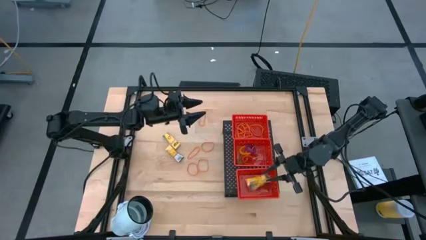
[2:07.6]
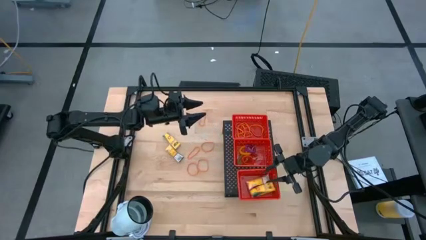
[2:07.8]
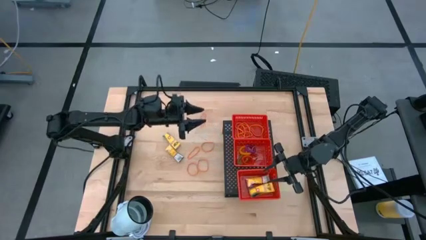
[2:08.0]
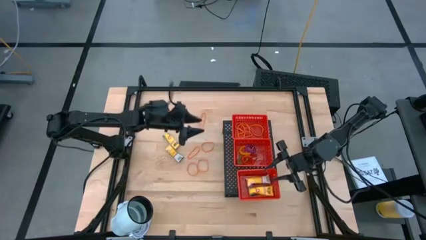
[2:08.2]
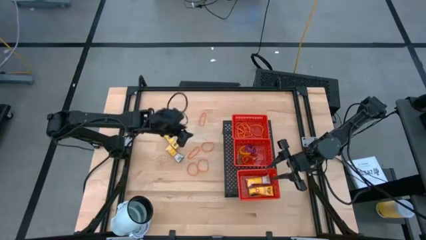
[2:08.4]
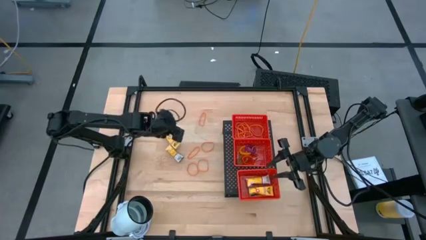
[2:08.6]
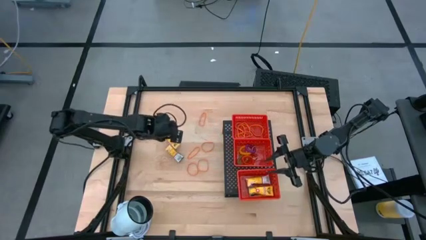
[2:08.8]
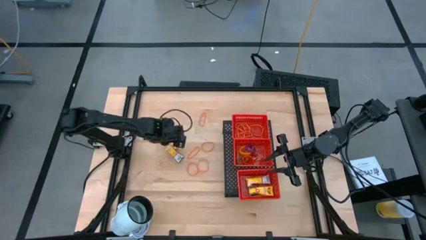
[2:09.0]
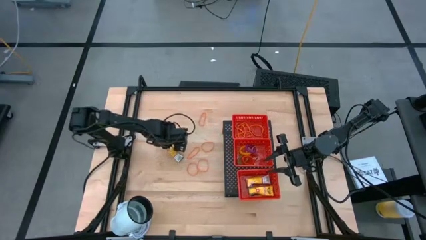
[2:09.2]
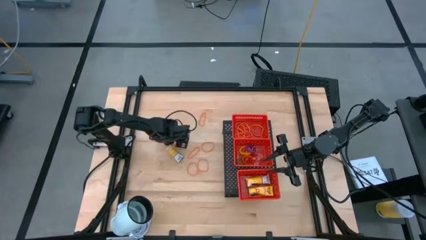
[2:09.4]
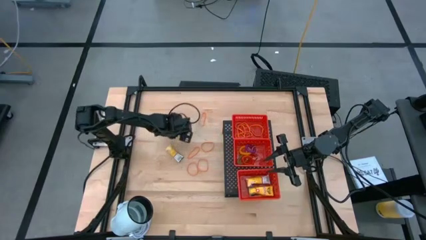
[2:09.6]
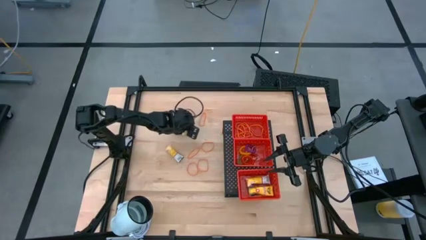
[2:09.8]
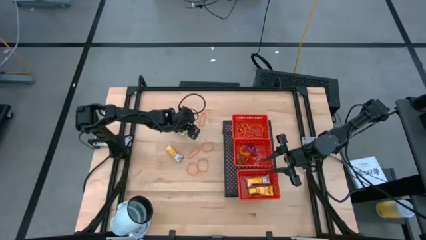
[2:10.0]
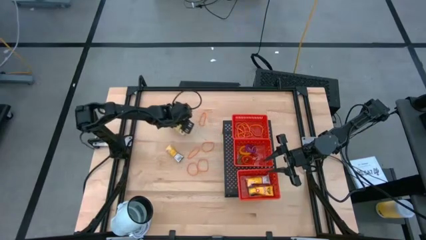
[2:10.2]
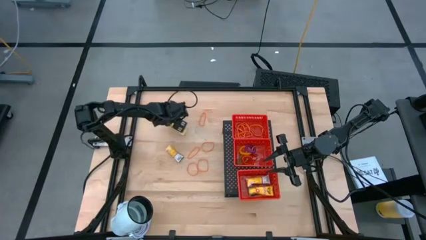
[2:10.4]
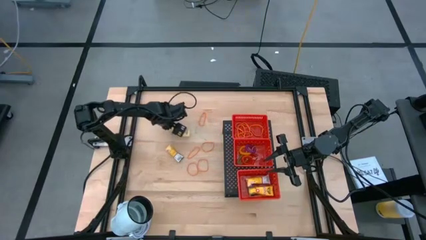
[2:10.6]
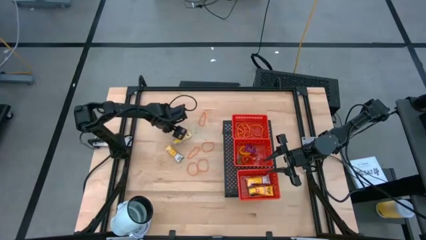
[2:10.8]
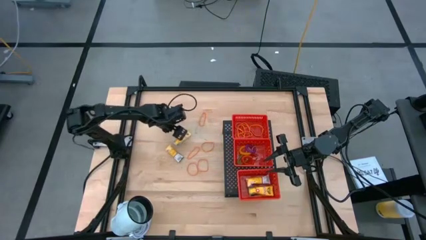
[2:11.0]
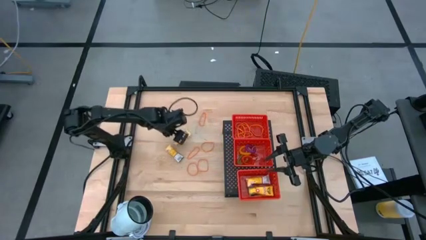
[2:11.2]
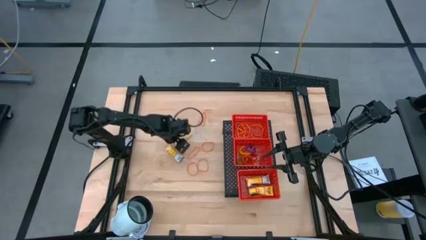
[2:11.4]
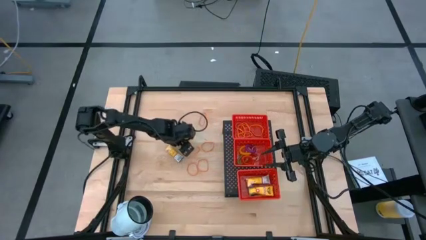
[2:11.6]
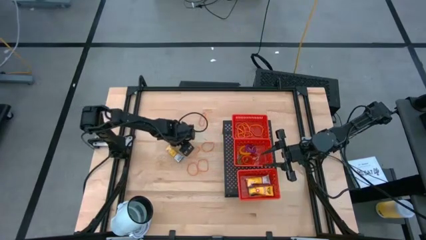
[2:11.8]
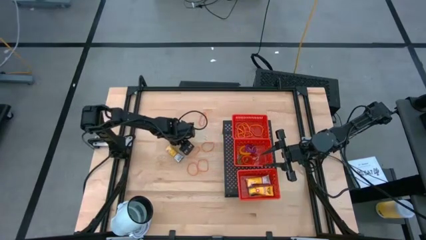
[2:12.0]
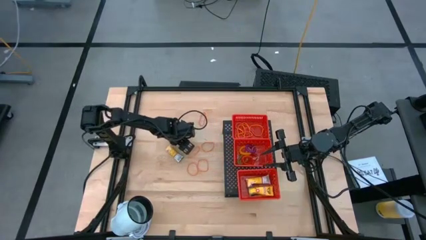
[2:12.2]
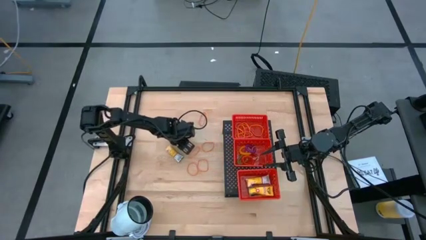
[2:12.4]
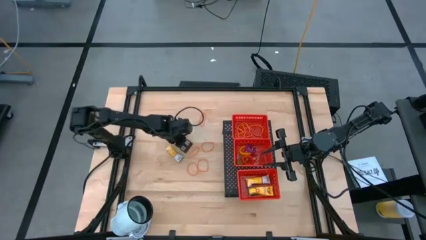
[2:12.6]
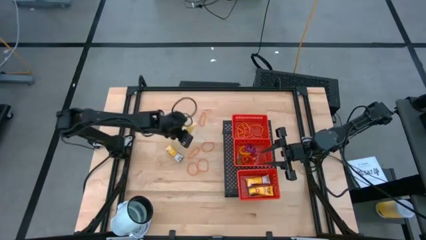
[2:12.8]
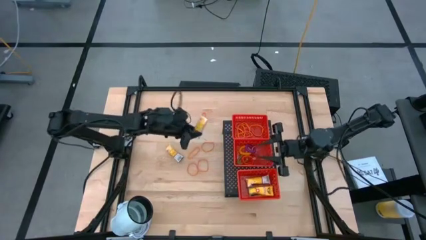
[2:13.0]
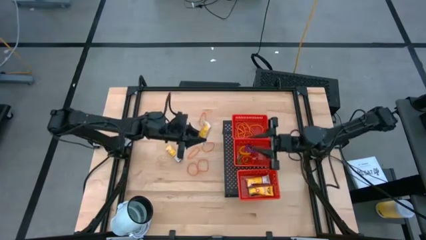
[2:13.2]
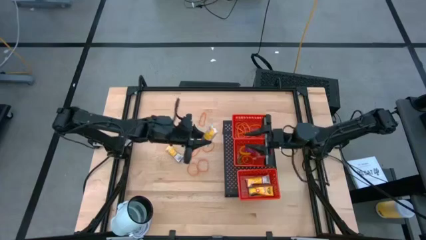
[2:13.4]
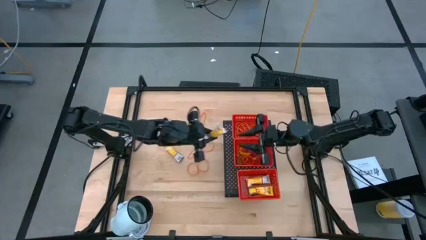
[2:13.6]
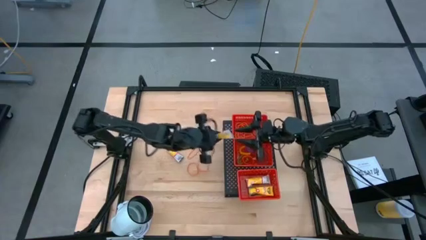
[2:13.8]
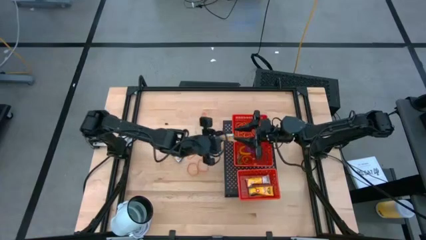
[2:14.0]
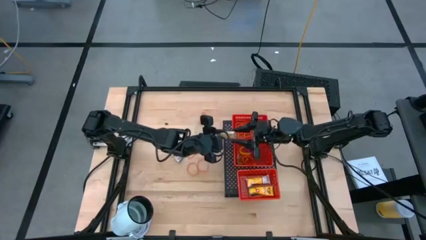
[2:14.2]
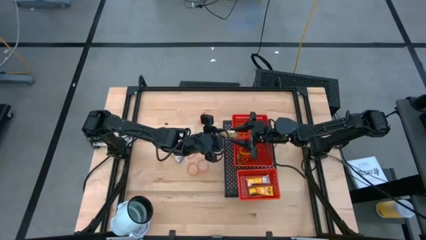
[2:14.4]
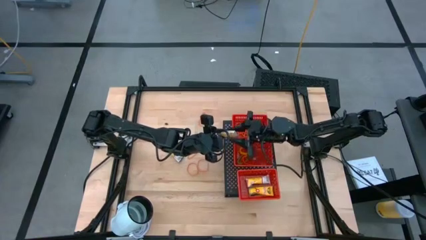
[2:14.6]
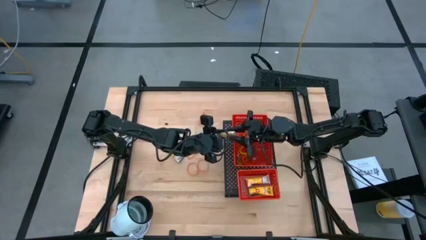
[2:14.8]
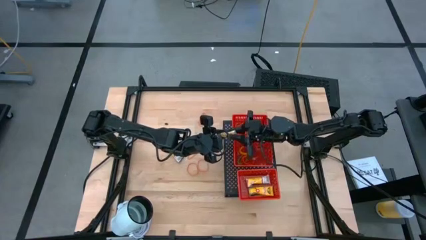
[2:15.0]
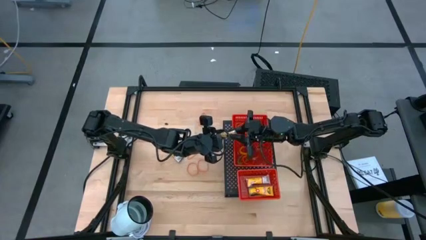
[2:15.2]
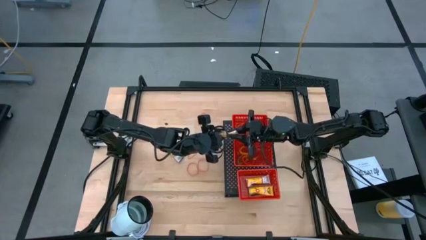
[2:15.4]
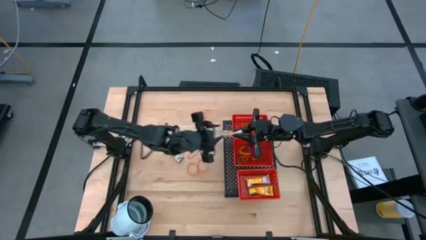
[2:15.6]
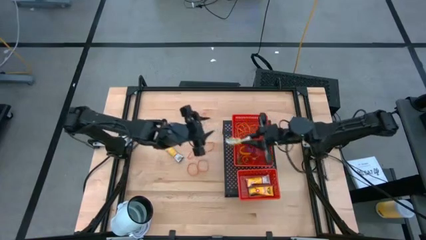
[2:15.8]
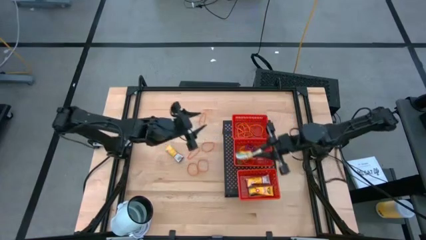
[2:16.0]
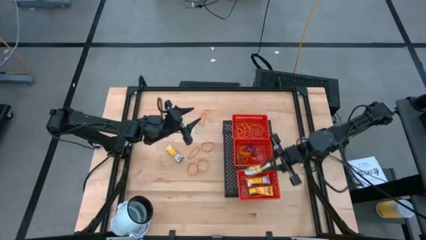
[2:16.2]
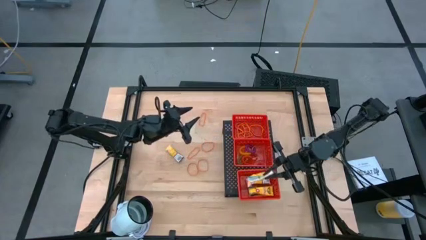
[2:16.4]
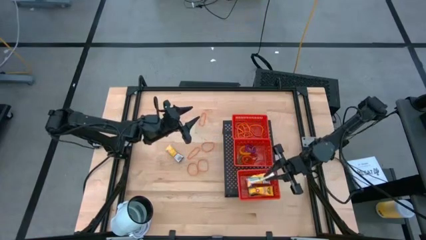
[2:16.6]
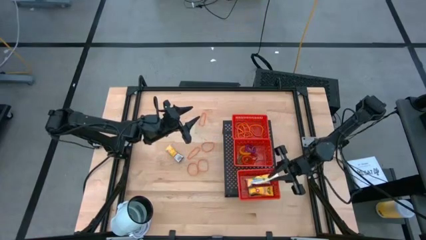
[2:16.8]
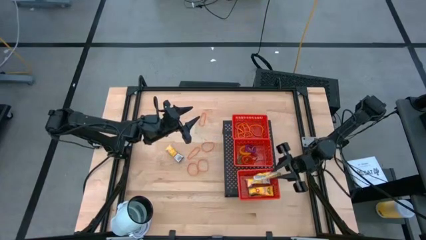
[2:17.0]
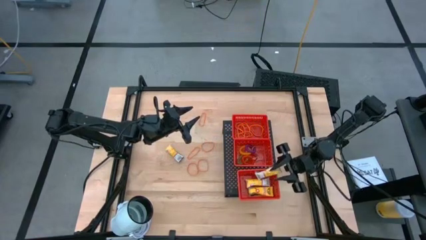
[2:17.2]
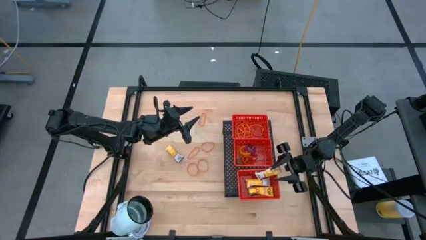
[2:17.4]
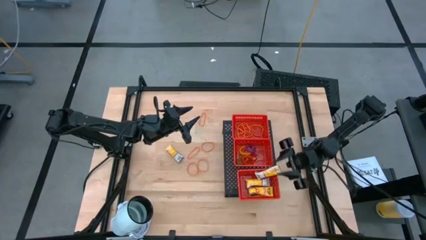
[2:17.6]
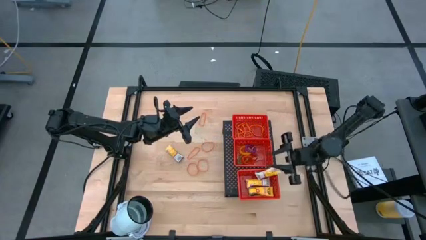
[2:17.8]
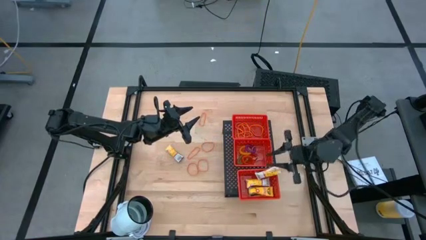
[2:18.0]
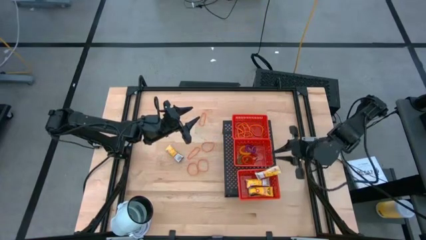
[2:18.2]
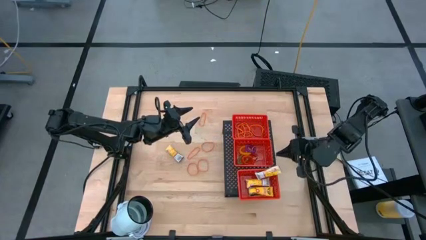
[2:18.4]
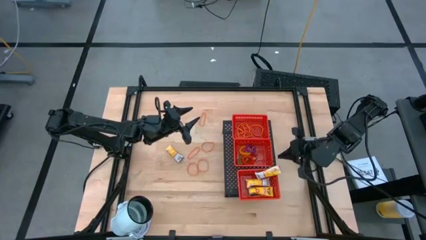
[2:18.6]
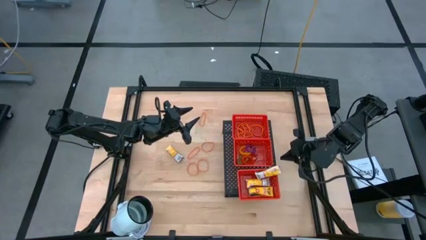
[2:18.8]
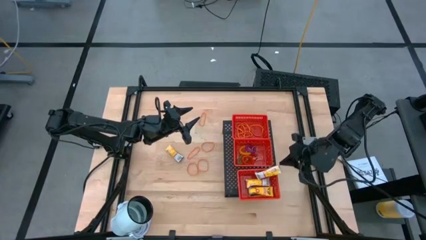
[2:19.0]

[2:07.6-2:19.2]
Task: Pick & Place Office Desk Supplies
Put the yellow pack of crayons into the bottom red bin on the shelf

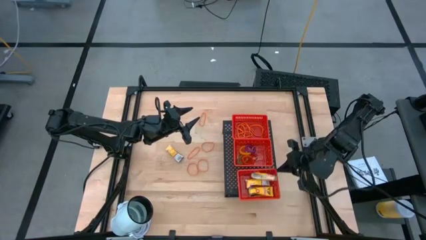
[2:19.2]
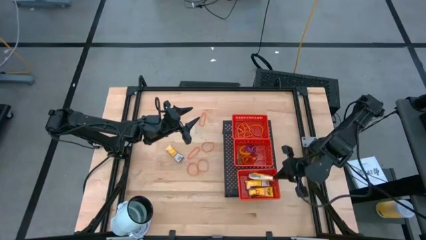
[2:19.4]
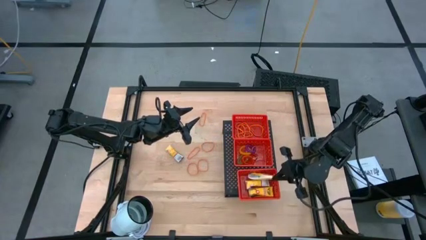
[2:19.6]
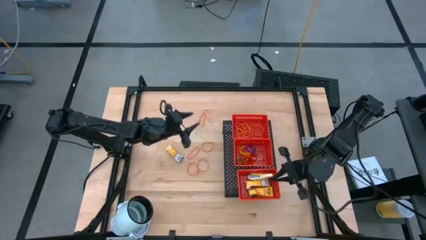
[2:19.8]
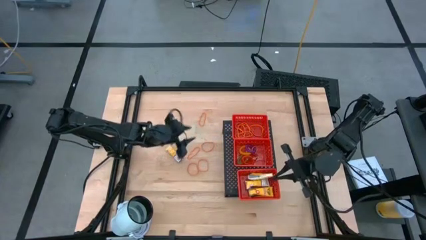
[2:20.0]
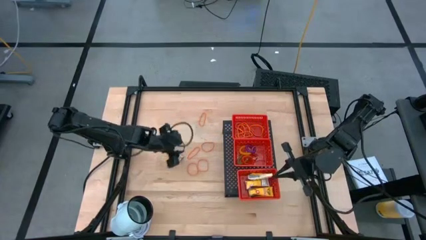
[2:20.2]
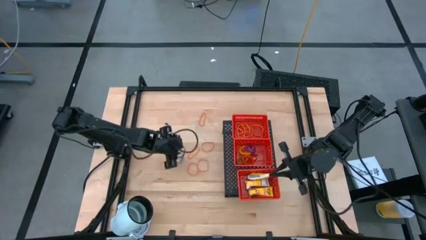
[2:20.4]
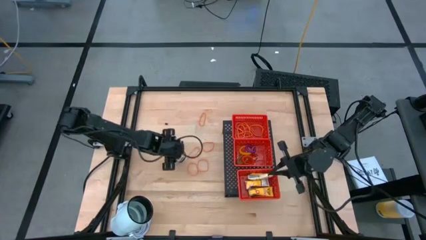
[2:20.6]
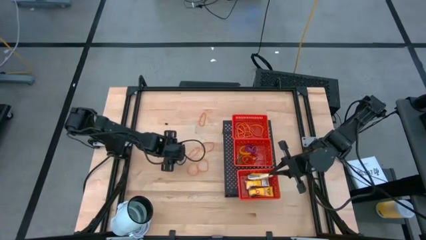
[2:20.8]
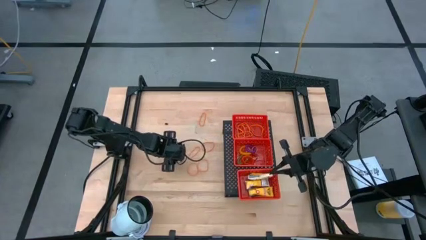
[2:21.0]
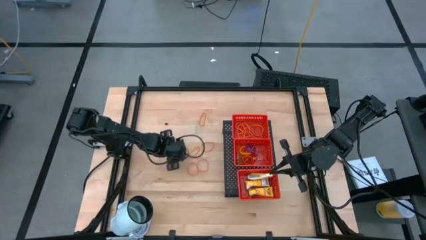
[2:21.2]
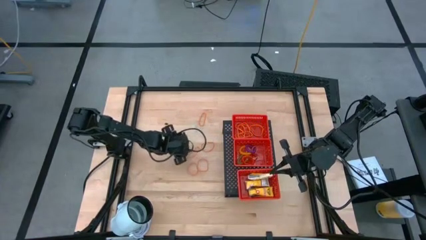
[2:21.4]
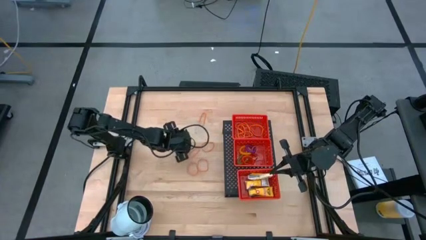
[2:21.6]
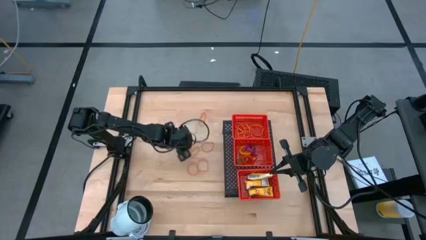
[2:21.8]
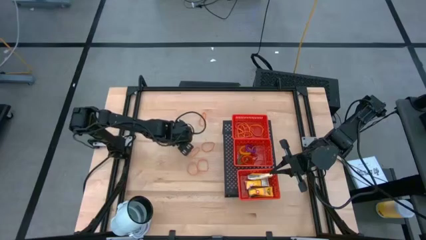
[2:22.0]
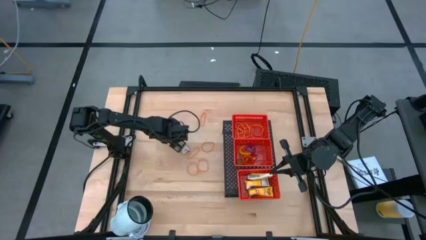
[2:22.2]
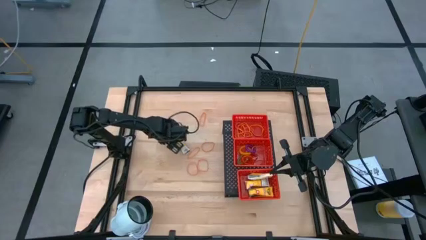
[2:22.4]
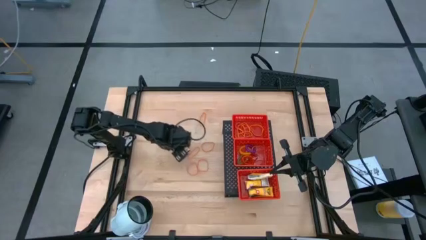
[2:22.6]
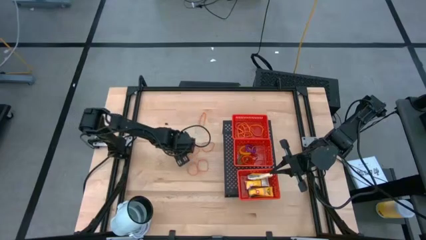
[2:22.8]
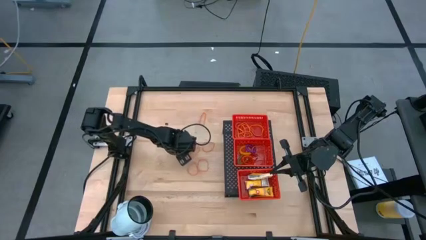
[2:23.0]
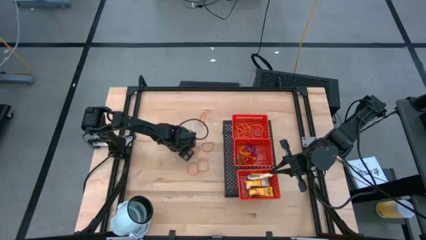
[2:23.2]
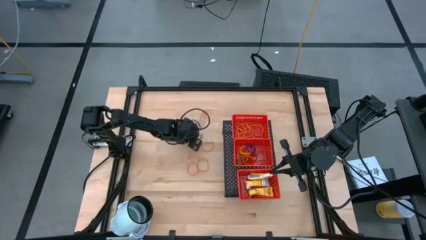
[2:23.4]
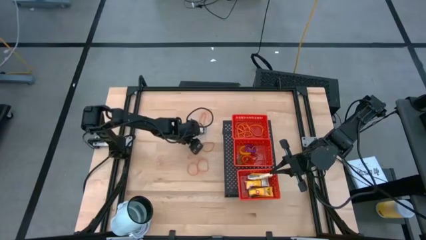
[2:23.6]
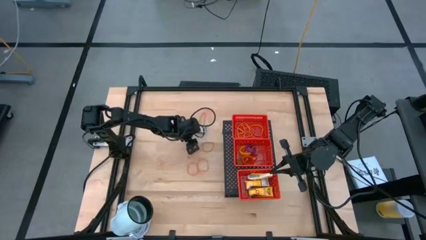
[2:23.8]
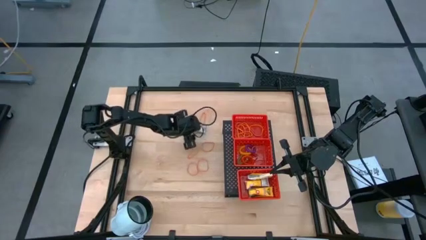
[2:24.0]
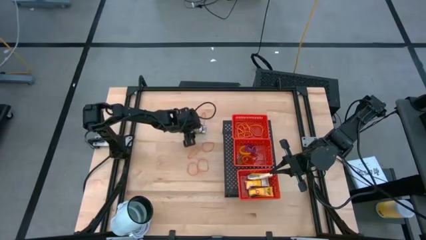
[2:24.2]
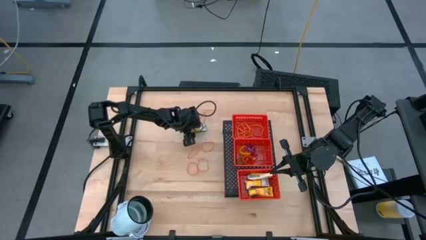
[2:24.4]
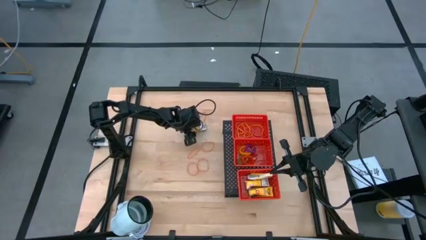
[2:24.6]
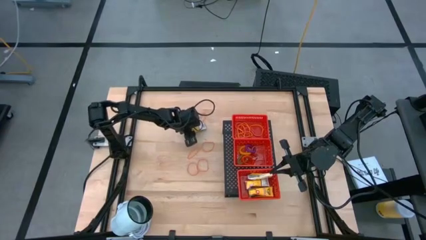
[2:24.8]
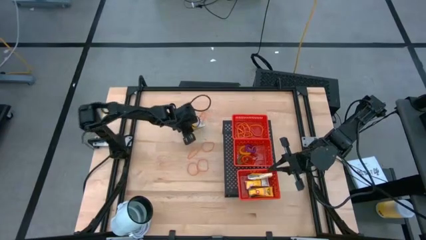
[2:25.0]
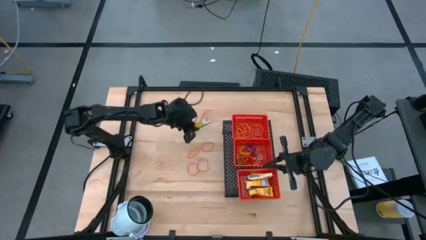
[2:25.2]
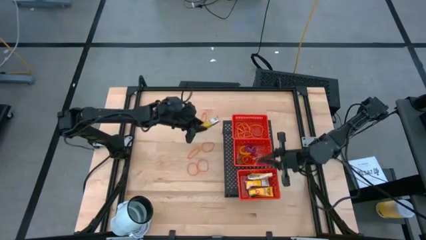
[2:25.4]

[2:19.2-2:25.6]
Put the yellow pack of crayons into the bottom red bin on the shelf
